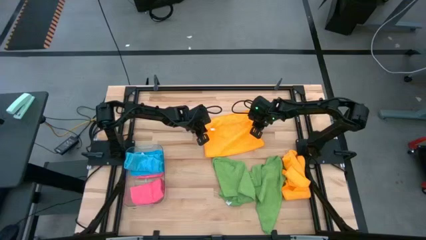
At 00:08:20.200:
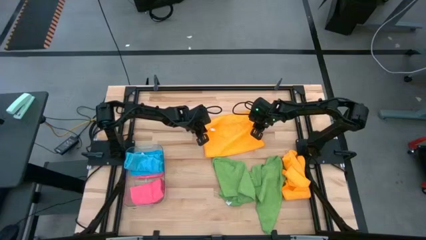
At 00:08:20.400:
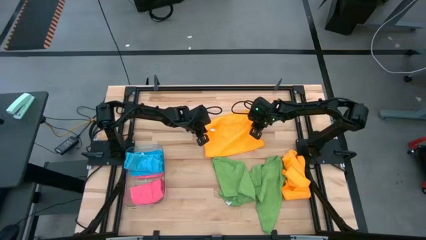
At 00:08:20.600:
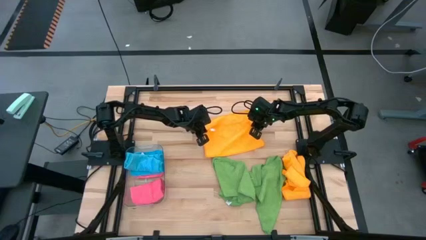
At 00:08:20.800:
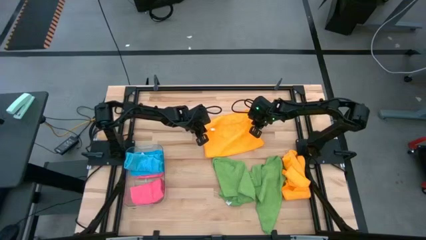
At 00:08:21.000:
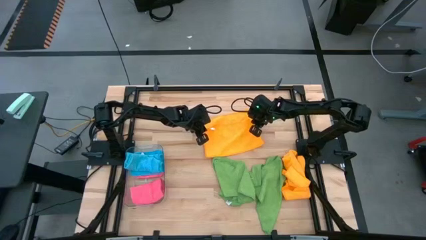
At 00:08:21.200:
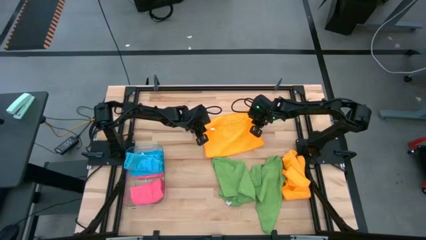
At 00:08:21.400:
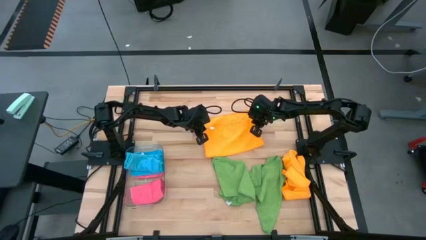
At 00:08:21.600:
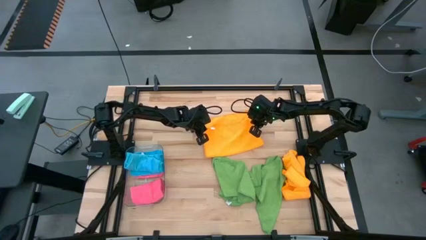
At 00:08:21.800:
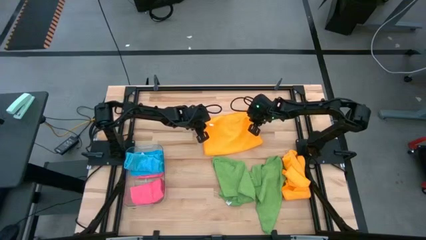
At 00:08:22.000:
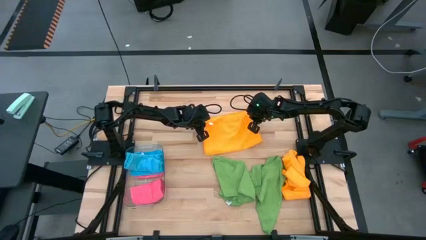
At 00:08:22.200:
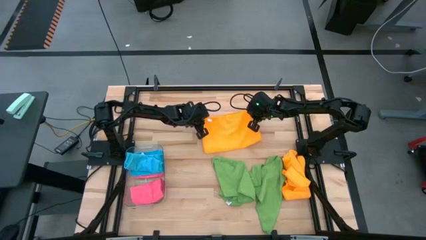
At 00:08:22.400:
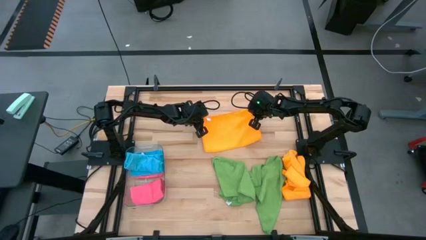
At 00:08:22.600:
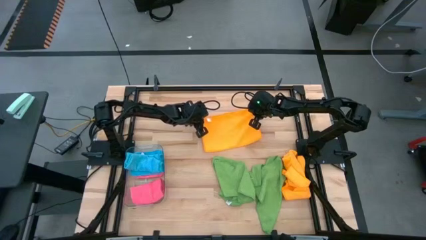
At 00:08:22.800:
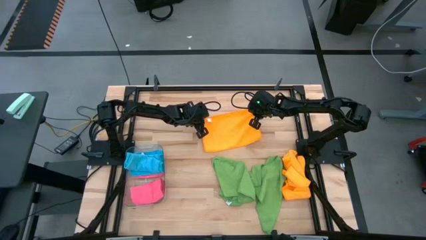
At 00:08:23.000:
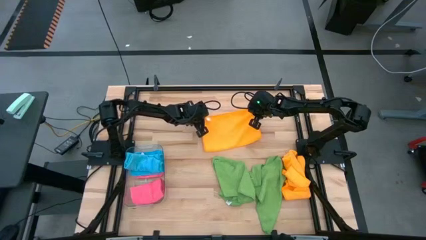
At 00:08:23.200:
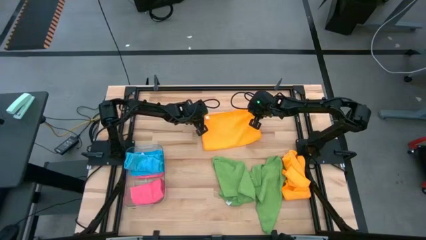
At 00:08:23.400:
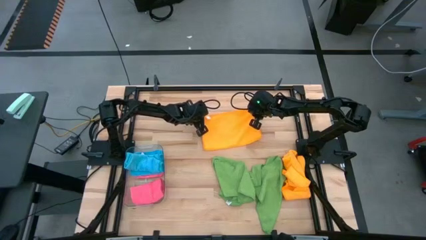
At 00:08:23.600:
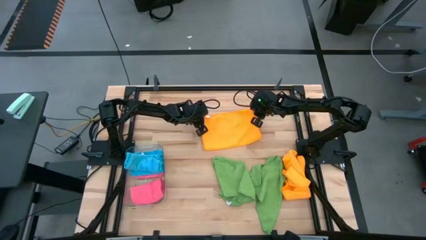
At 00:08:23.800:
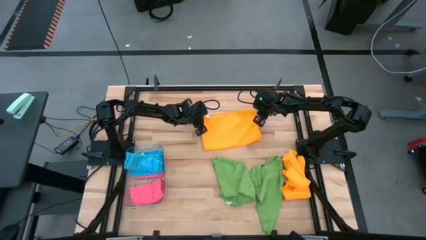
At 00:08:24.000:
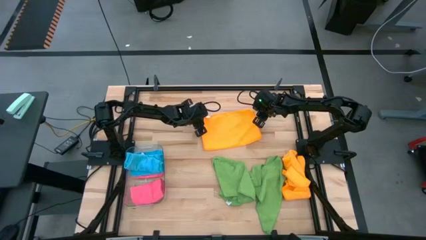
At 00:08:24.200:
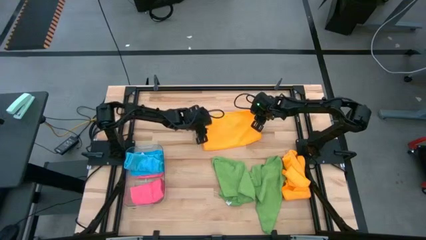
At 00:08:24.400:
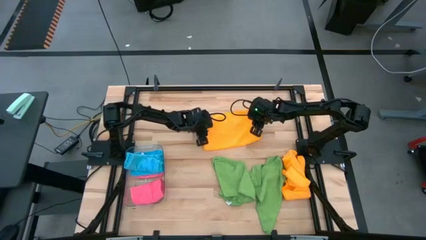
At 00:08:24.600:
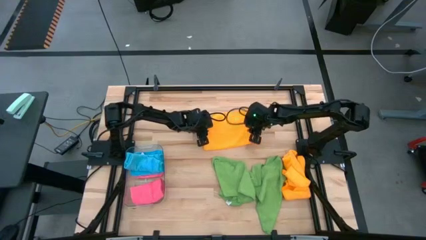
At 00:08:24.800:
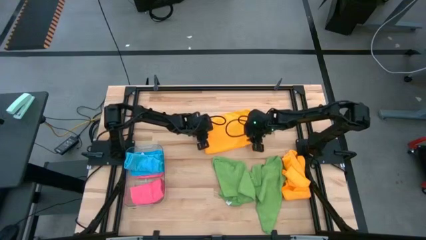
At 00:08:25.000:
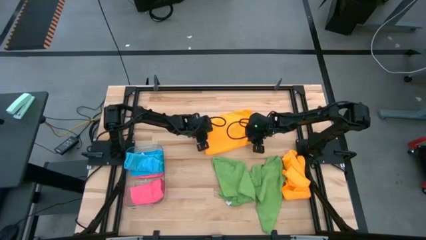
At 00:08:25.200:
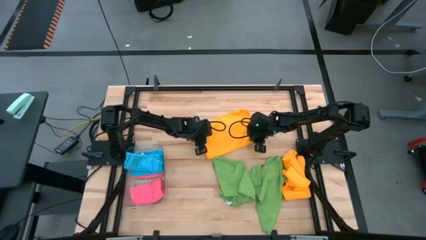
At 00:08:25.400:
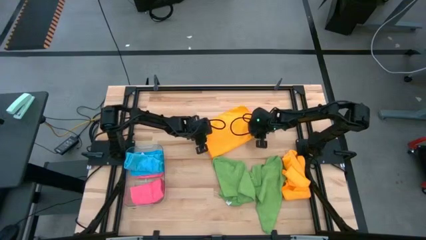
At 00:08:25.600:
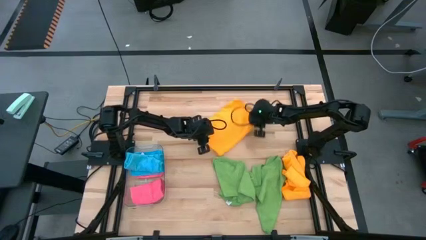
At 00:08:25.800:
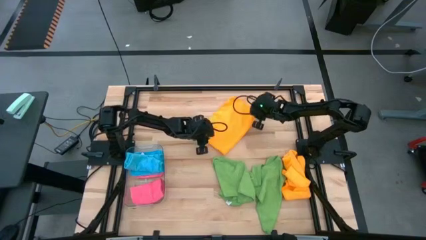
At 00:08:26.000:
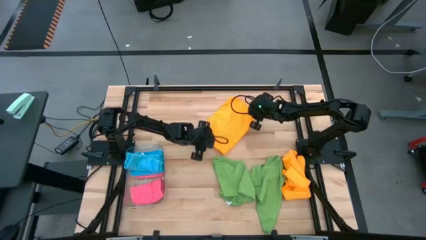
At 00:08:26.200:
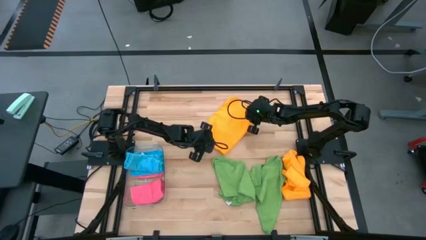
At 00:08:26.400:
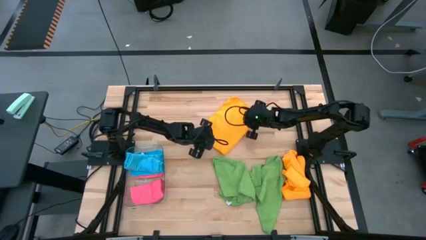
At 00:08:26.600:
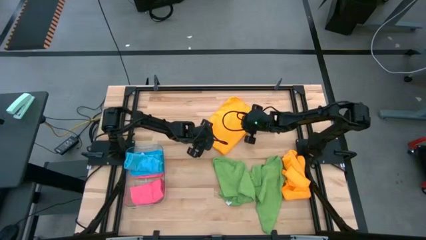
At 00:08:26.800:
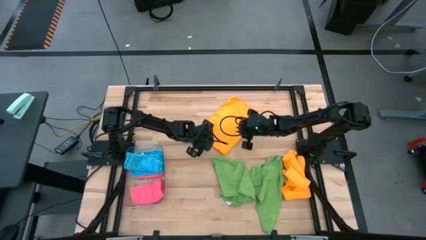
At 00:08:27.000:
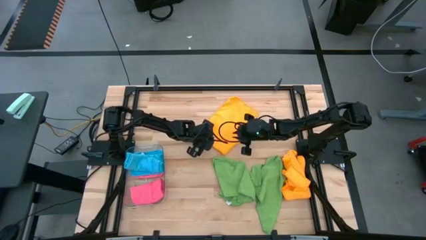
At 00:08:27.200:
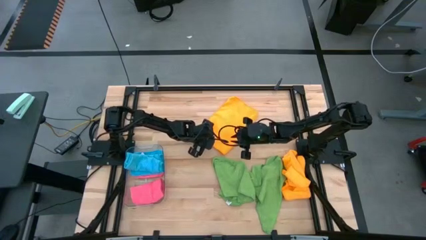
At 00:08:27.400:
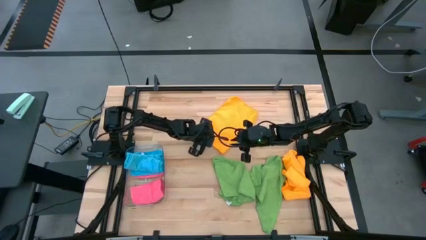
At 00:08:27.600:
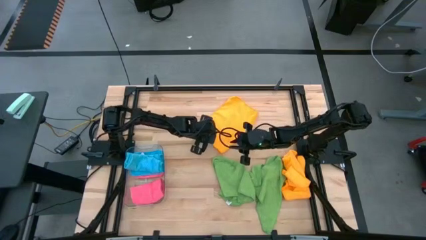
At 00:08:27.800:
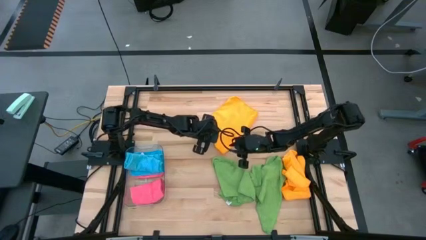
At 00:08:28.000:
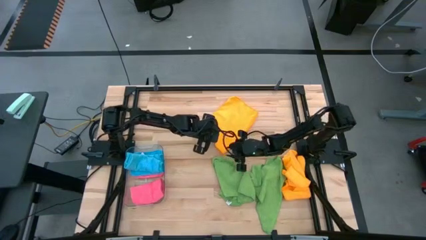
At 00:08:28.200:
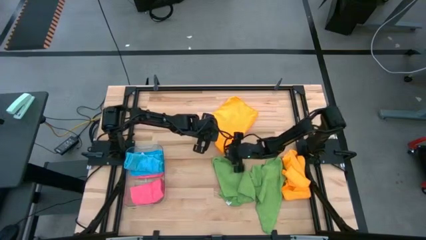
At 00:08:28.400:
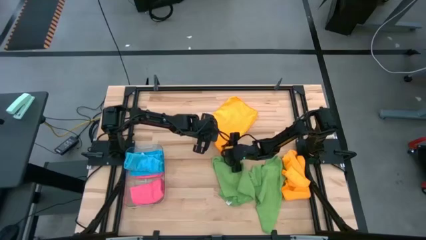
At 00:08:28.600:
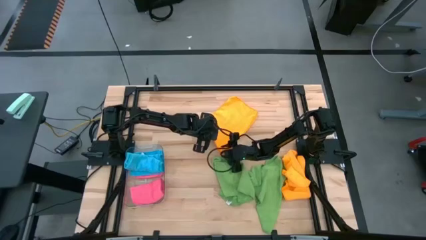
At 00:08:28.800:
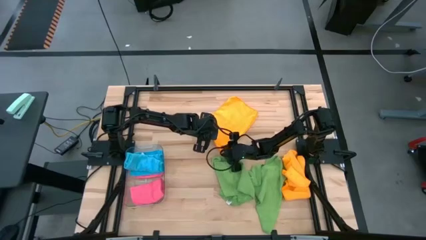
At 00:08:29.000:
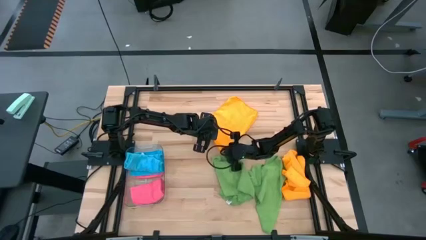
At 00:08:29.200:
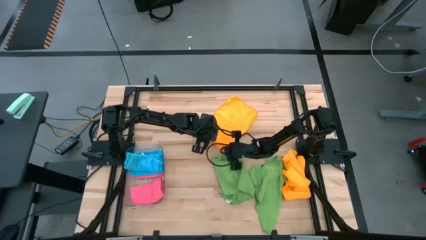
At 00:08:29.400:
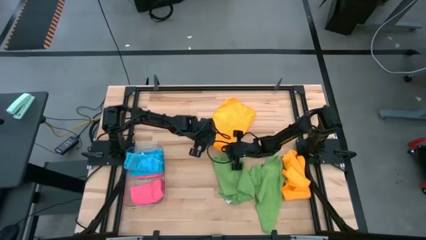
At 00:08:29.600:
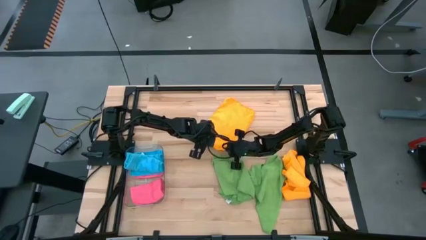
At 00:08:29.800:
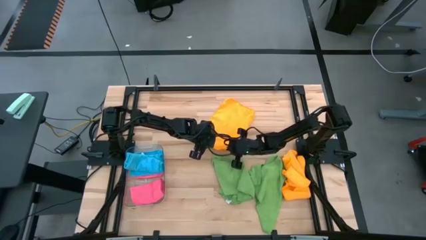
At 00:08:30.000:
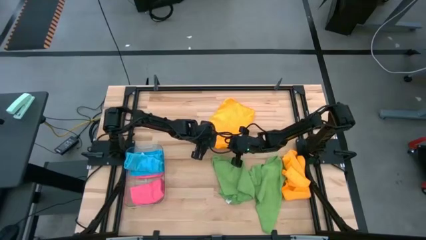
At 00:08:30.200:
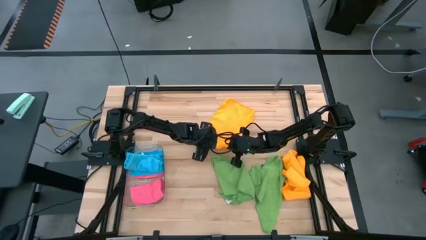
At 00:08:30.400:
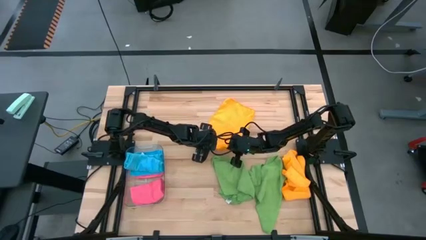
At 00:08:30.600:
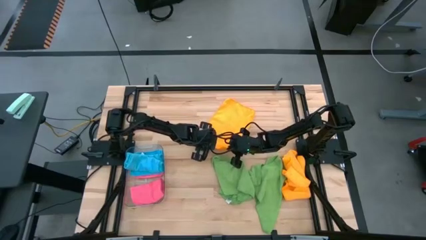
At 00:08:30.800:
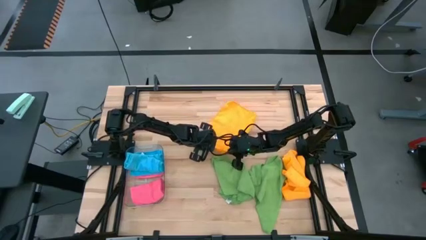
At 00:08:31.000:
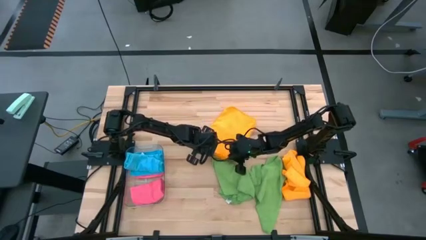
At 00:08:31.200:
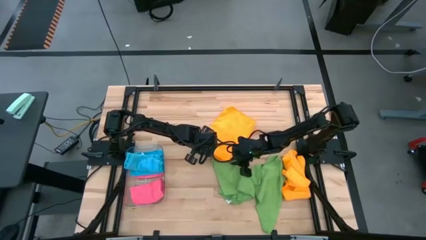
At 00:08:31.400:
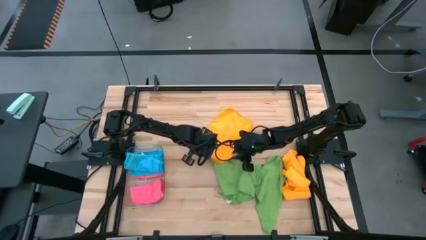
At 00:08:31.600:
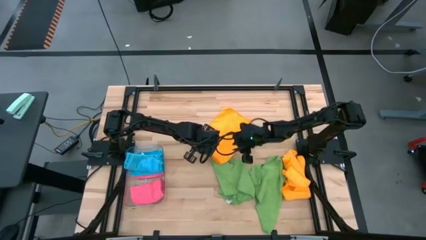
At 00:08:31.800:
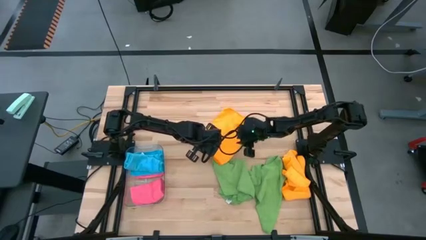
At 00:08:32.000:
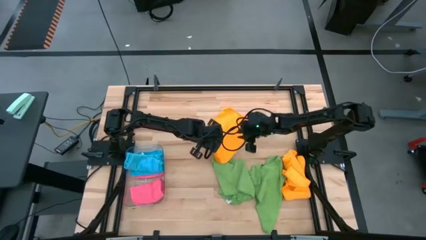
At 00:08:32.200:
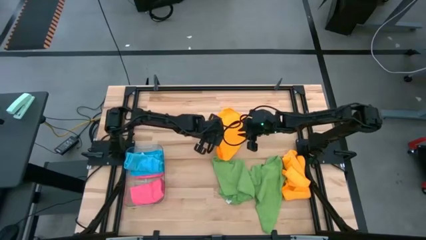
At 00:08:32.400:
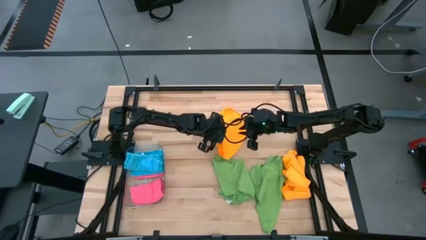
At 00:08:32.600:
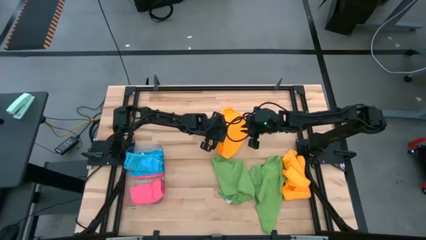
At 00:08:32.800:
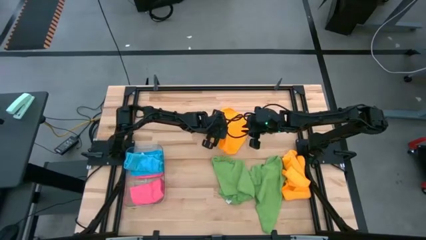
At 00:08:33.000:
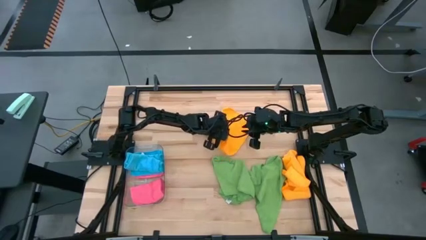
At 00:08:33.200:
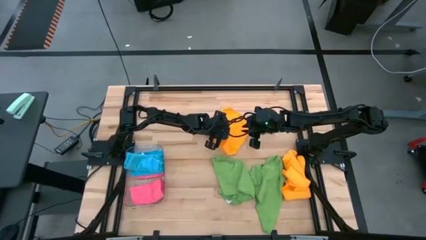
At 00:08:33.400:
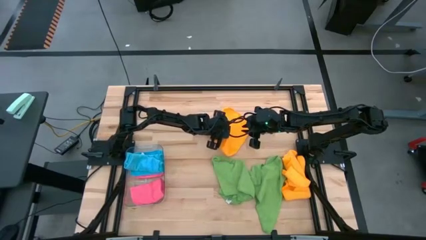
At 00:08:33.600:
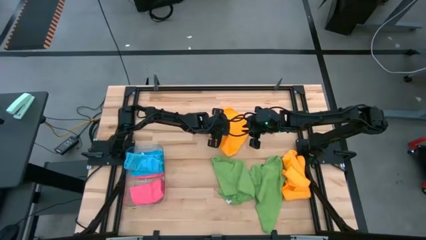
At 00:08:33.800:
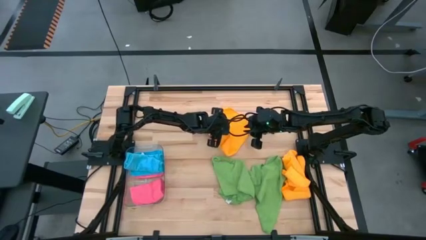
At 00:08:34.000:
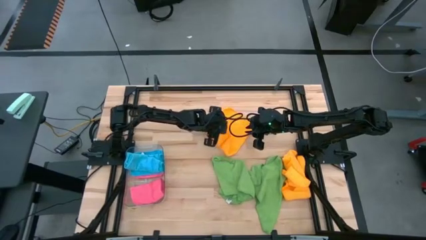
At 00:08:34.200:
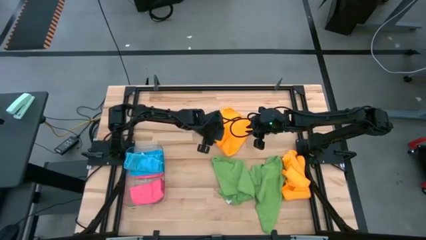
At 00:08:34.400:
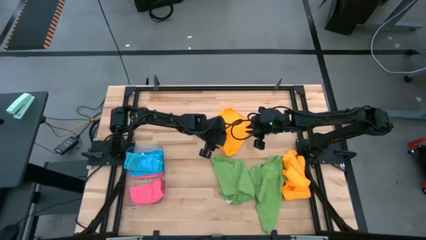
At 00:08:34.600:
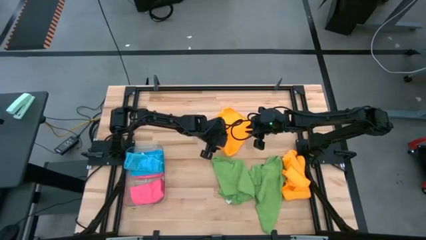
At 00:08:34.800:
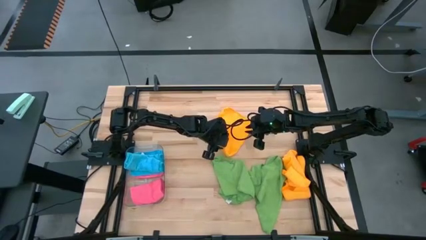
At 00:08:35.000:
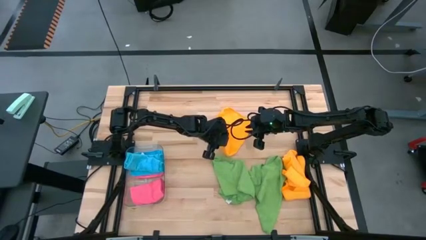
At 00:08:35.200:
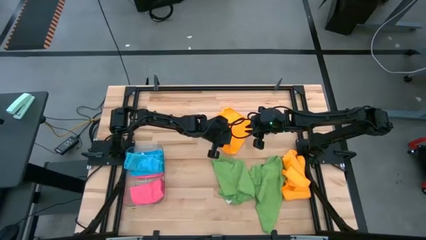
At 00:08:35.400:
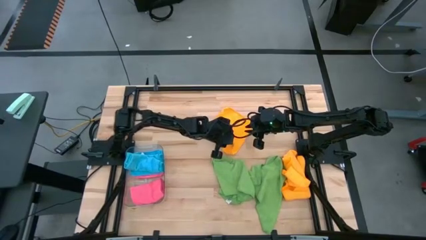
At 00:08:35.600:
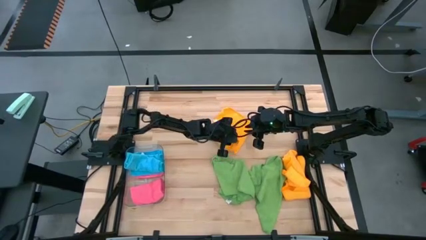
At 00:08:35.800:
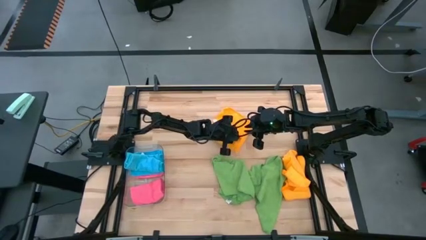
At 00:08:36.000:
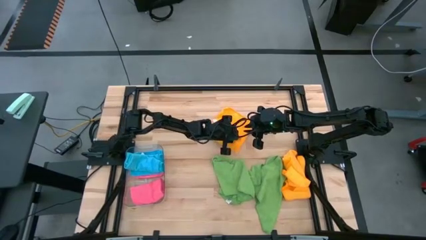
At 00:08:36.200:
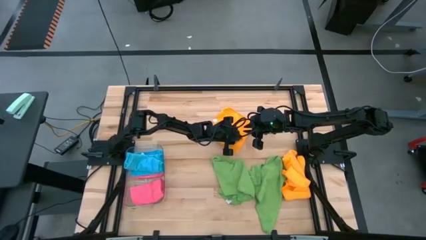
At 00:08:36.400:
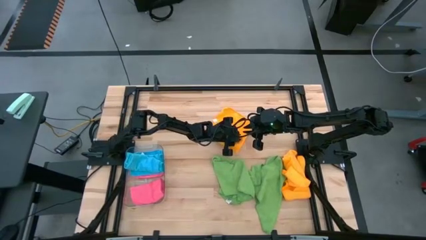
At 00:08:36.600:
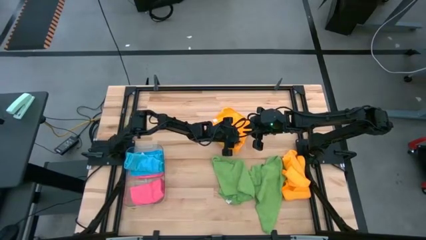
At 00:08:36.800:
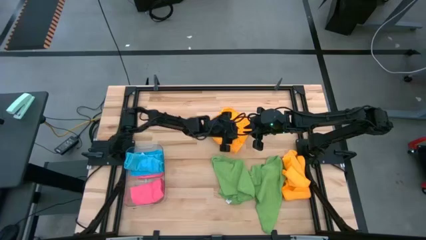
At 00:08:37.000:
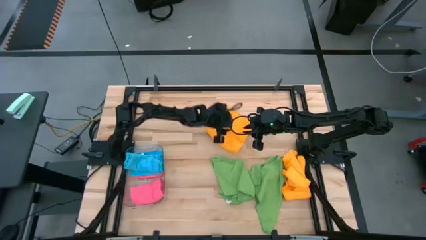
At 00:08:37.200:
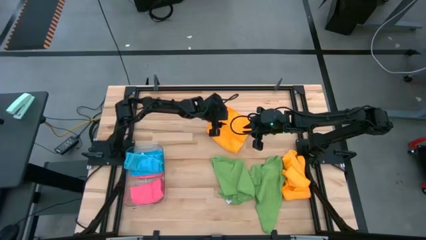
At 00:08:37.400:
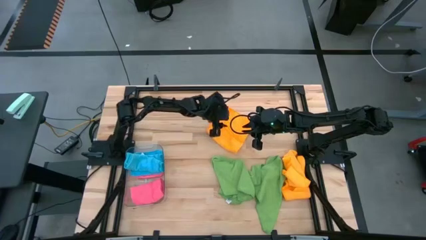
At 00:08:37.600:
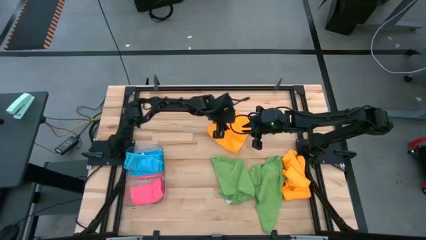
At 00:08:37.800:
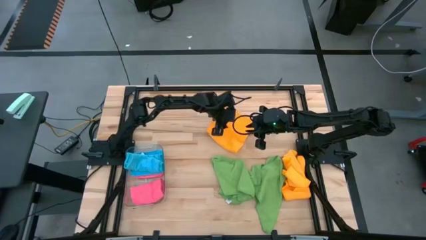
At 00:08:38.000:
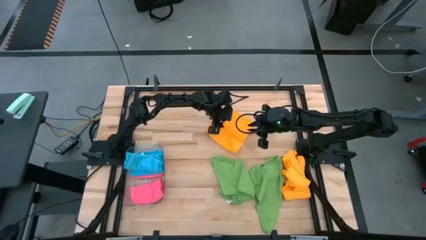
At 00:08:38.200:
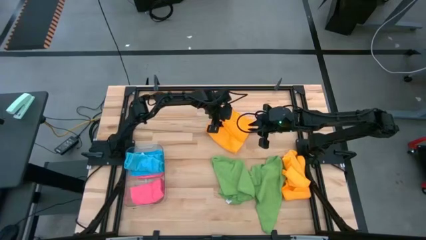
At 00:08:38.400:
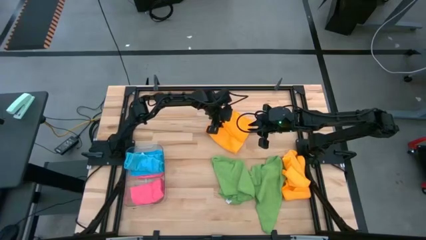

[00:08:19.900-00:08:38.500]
Task: Fold microfiber towels
Fold the left yellow microfiber cloth
